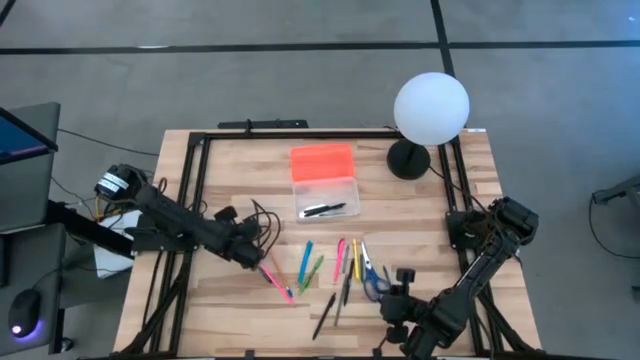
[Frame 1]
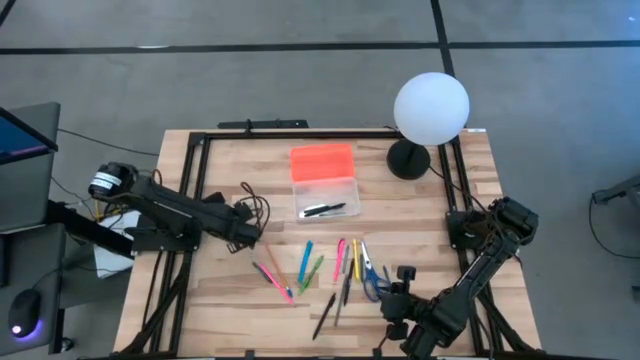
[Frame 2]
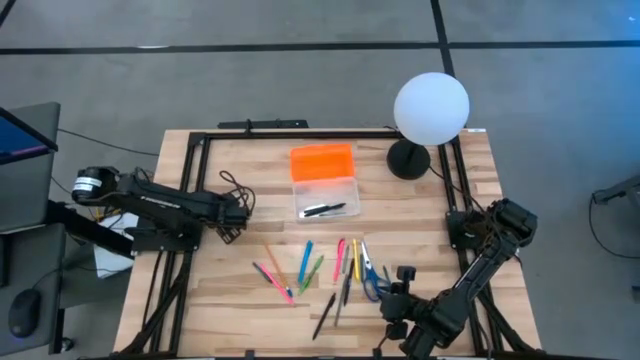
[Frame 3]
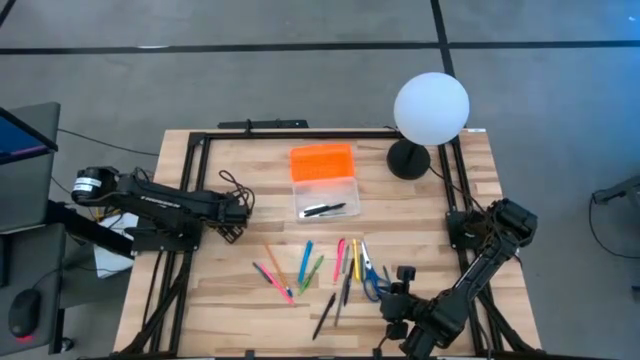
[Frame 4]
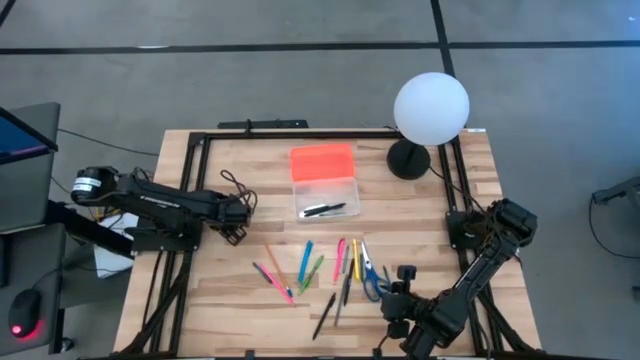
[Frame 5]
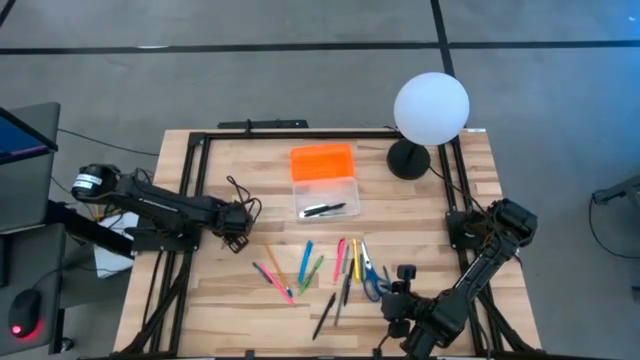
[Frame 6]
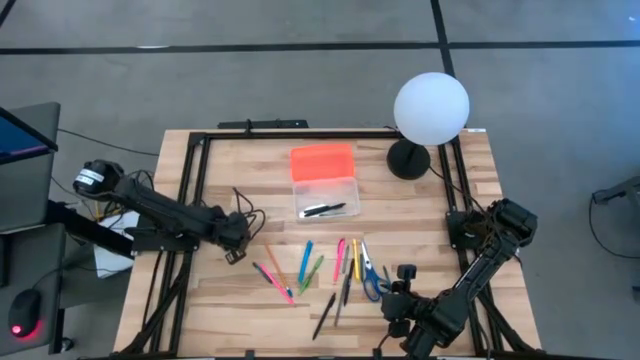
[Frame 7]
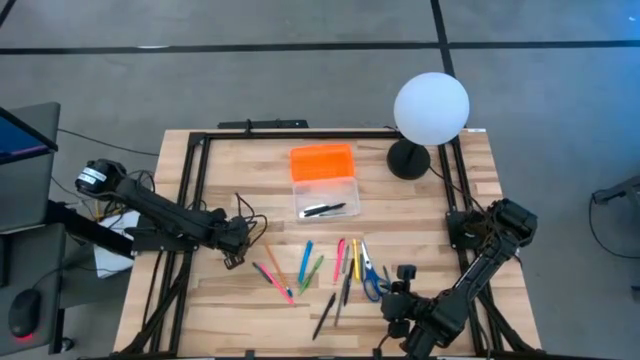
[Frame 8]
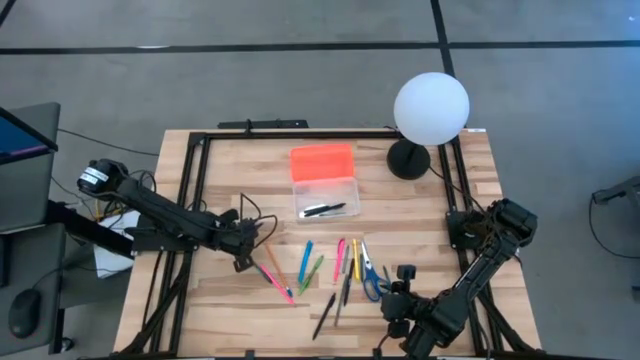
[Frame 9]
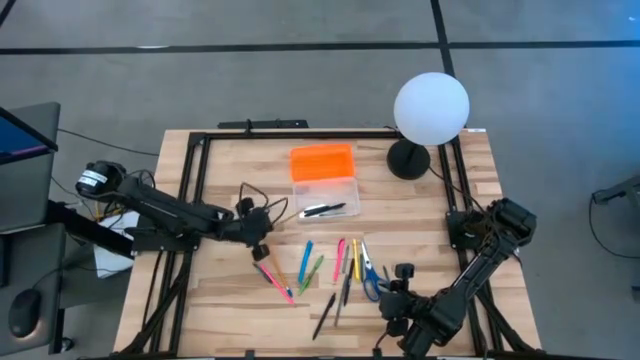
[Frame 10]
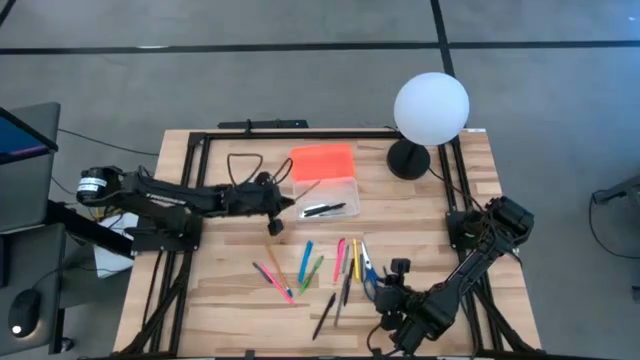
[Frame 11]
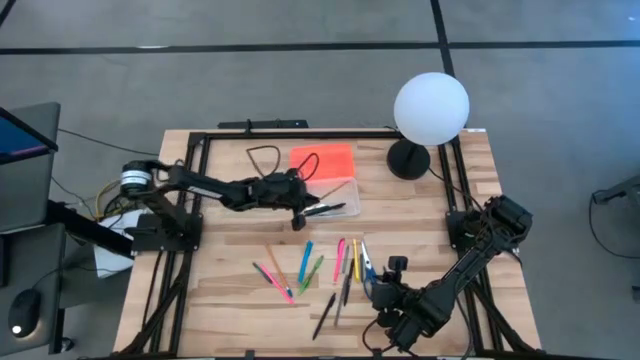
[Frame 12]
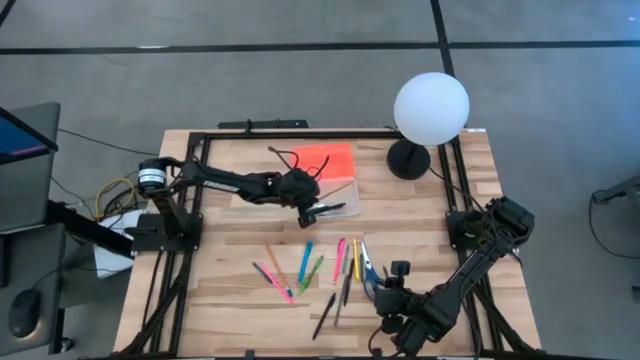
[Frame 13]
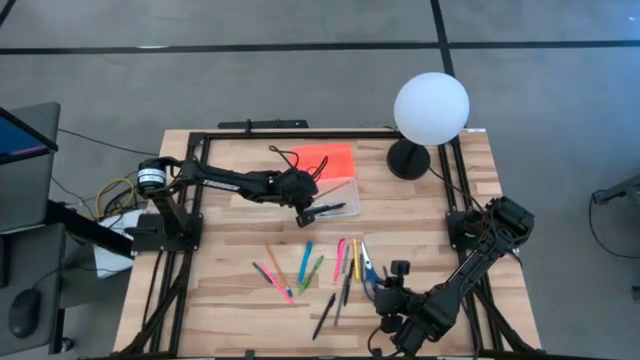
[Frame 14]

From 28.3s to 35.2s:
Task: Pick & place school supplies into a supply box
Put the yellow pencil into the supply box

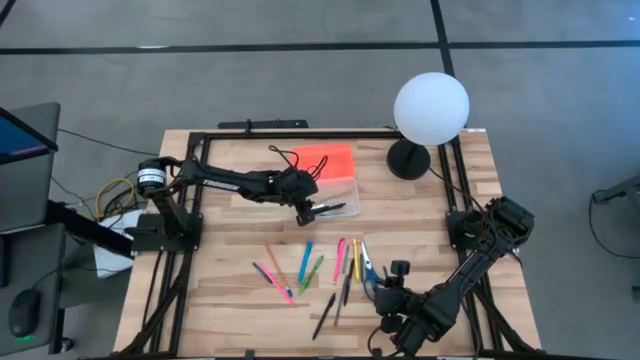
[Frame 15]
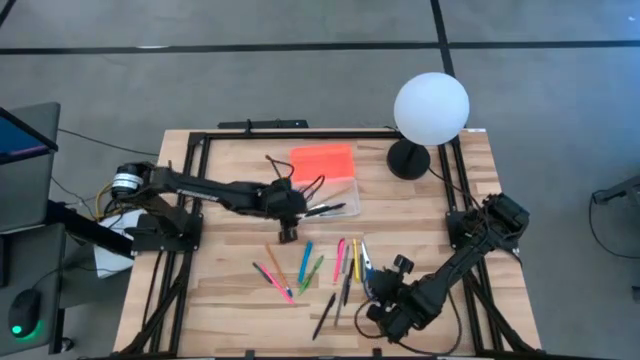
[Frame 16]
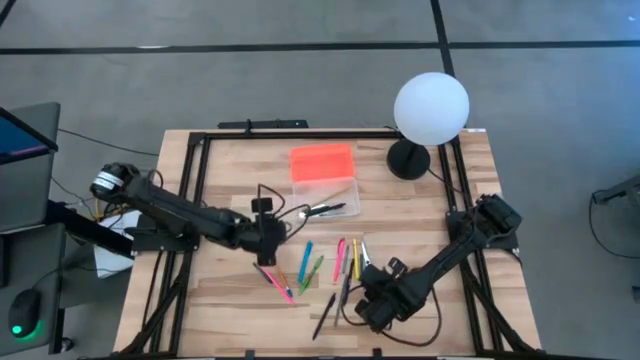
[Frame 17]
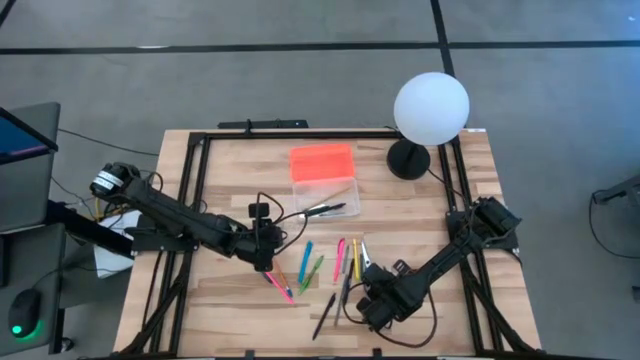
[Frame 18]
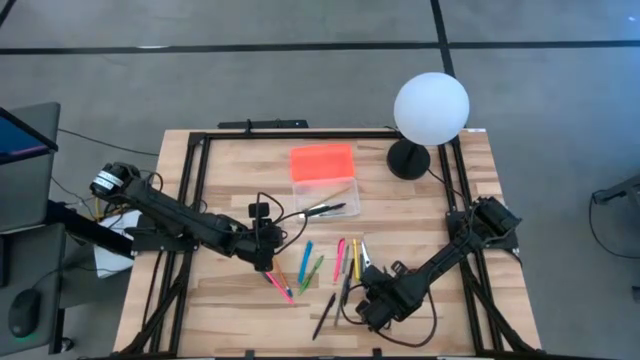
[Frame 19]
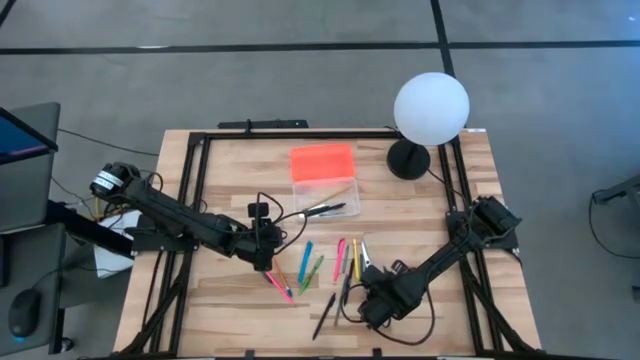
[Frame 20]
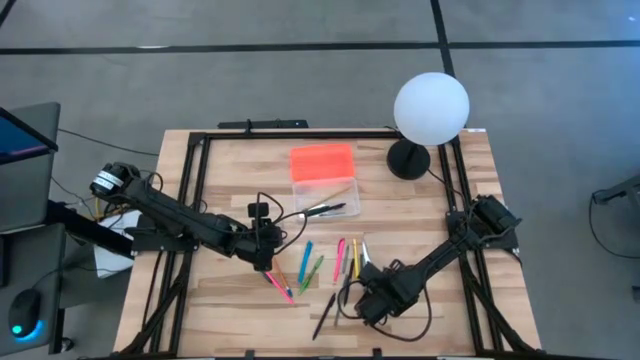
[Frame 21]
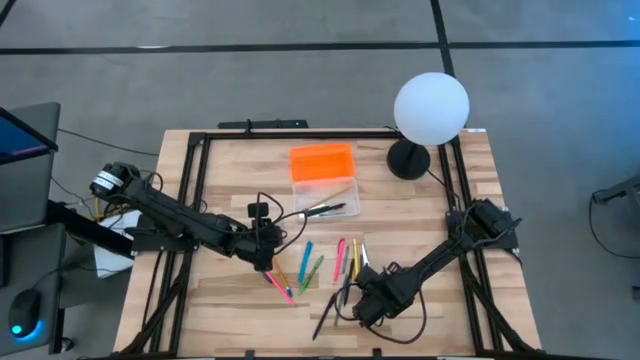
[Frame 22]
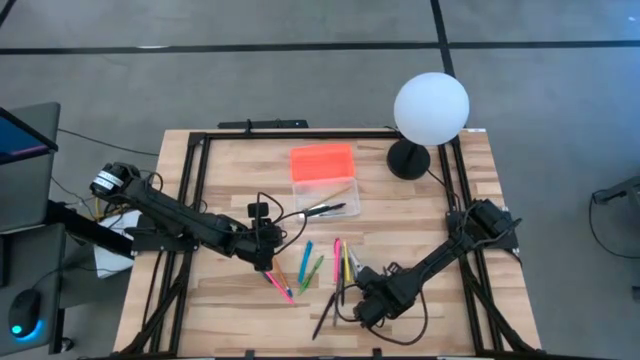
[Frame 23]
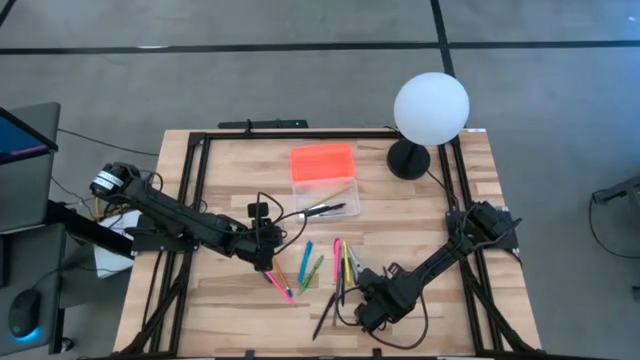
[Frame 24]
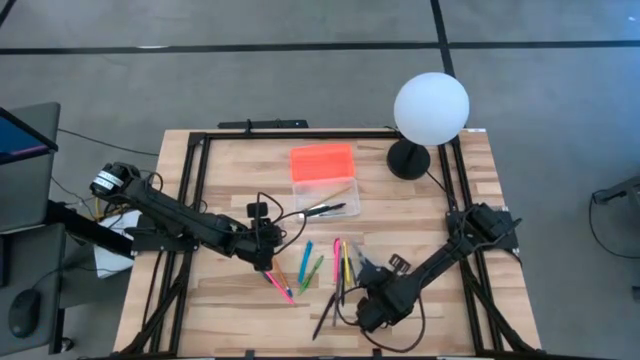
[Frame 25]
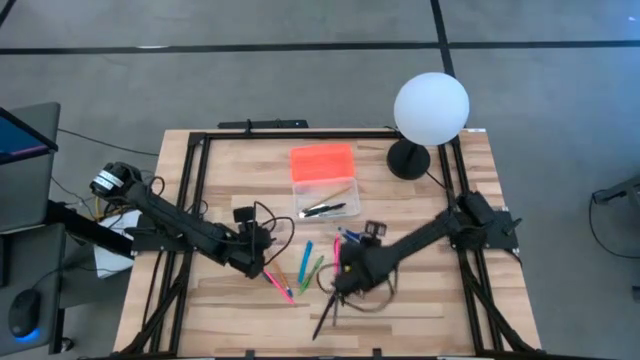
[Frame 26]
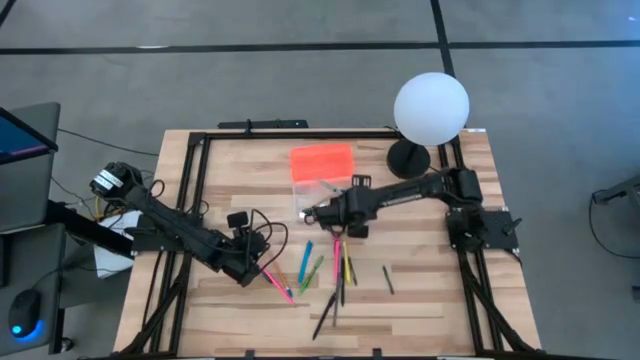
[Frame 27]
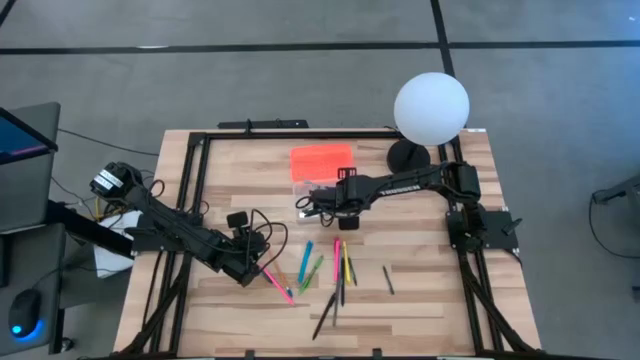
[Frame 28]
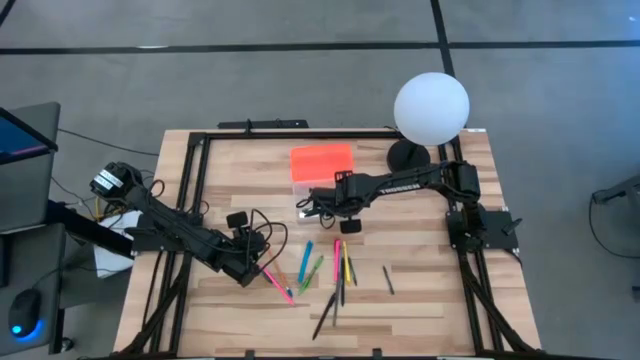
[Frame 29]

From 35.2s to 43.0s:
Put the blue scissors into the supply box

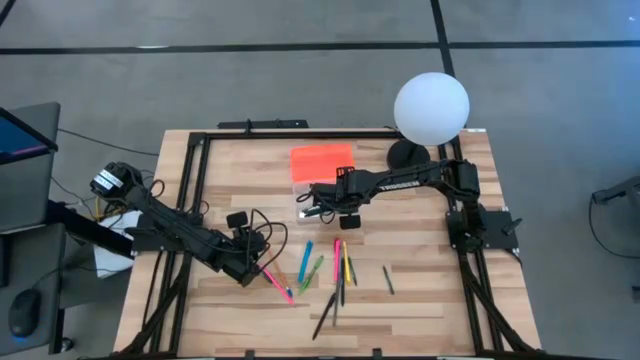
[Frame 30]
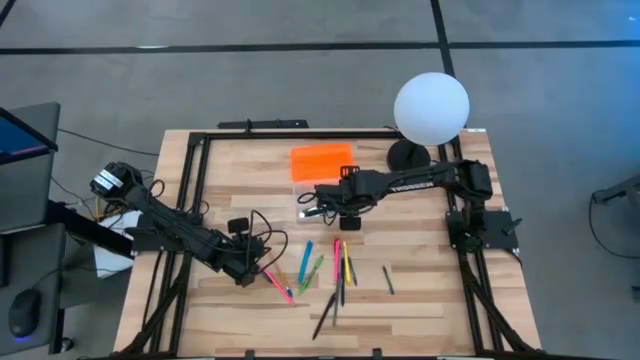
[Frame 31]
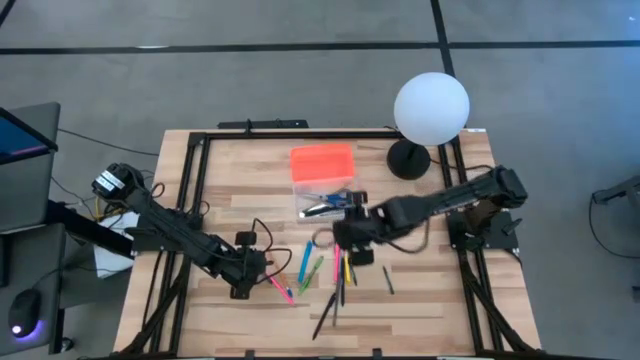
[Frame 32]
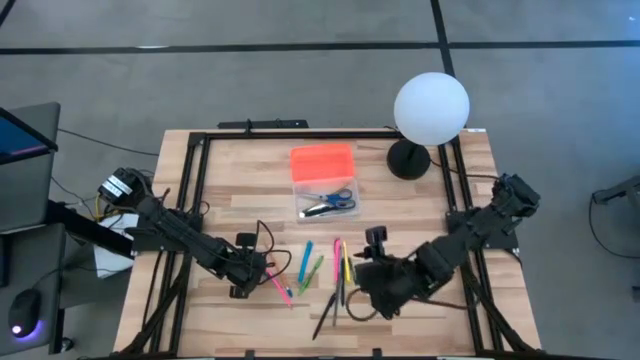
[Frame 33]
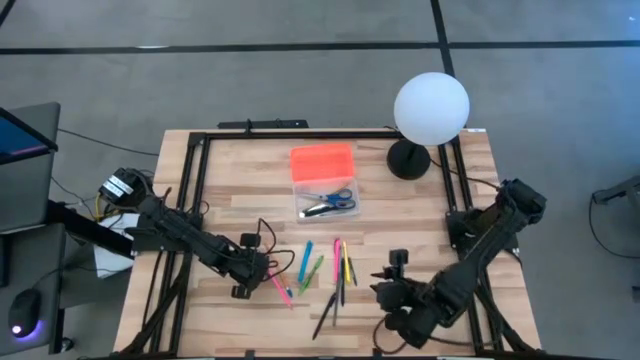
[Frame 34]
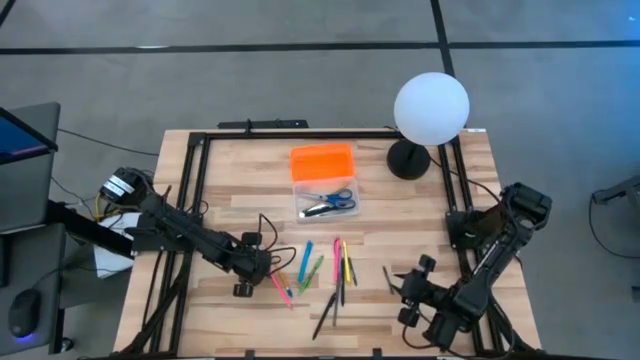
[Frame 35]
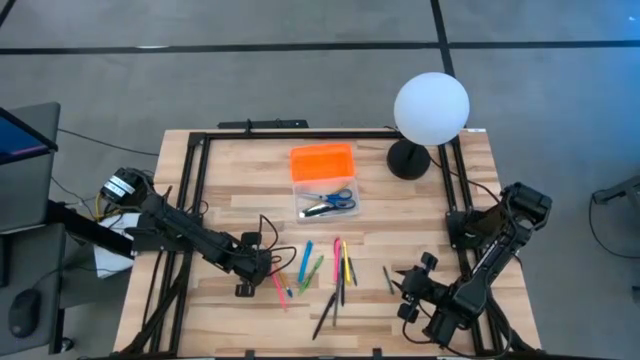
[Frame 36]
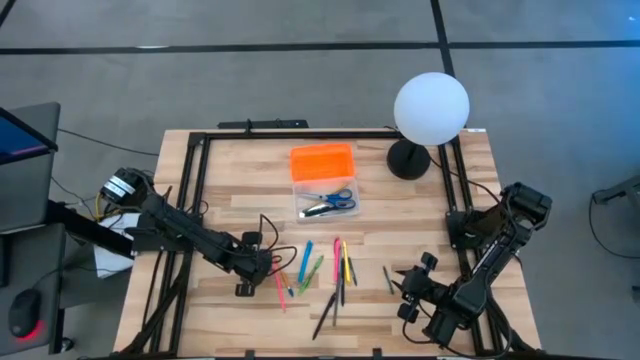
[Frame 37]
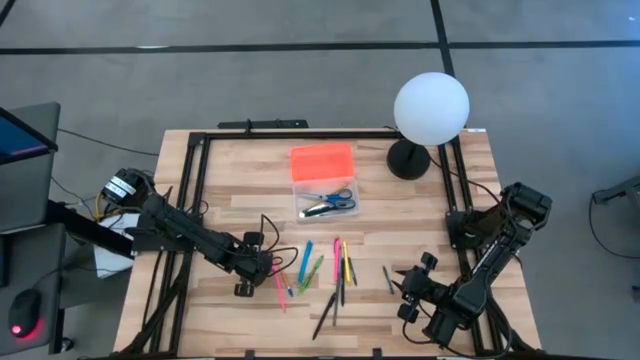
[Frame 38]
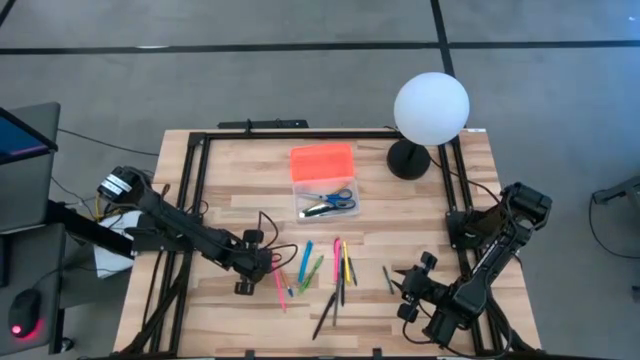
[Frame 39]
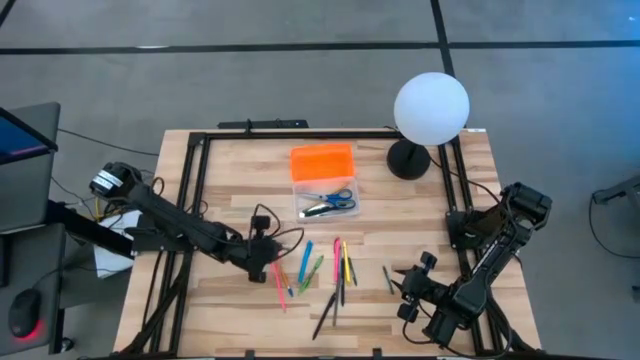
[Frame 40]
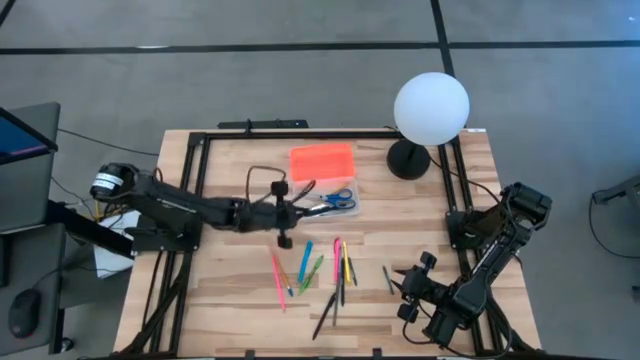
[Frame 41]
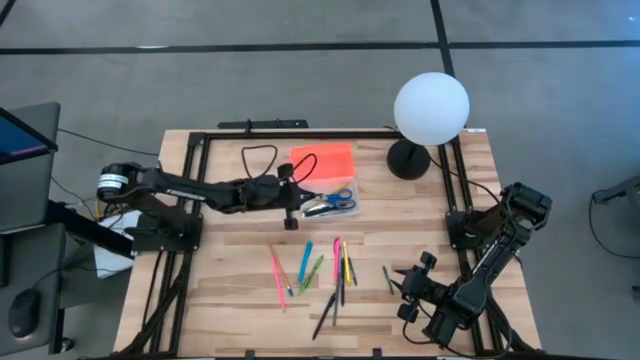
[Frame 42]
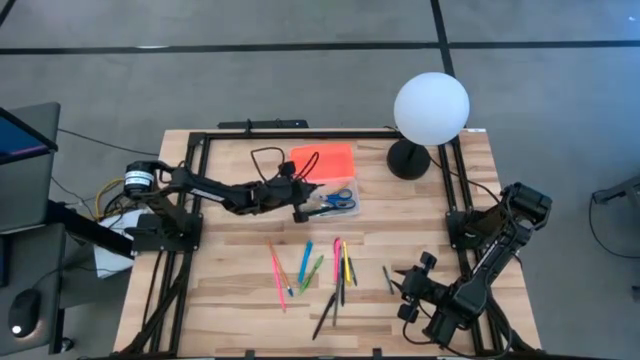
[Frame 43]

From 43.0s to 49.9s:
Put the green crayon into the supply box

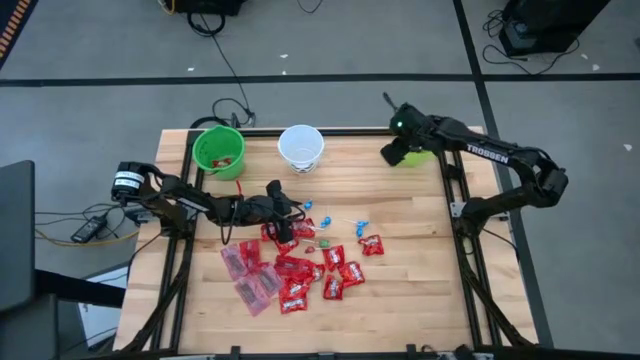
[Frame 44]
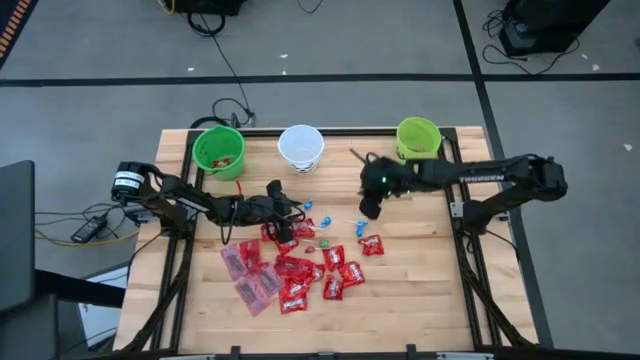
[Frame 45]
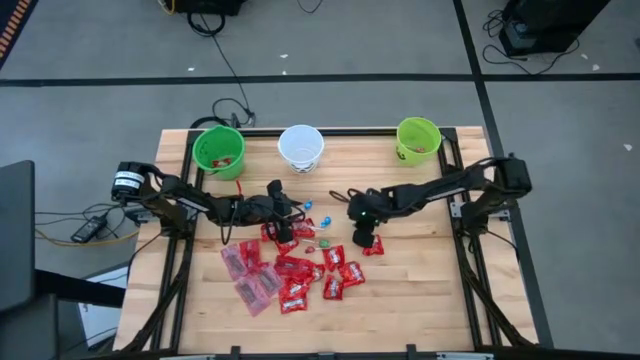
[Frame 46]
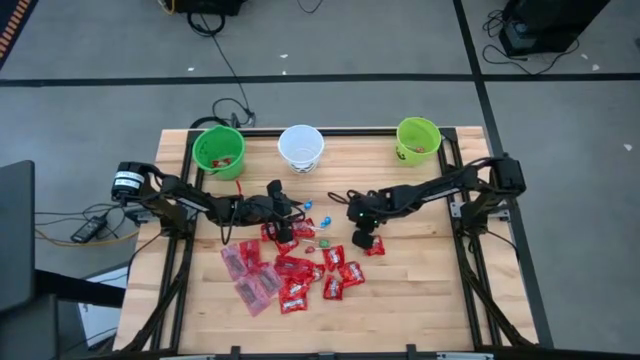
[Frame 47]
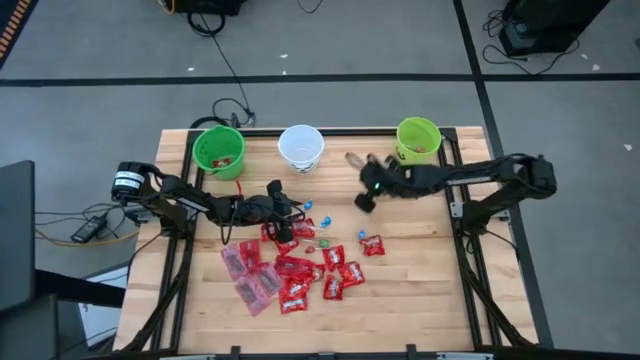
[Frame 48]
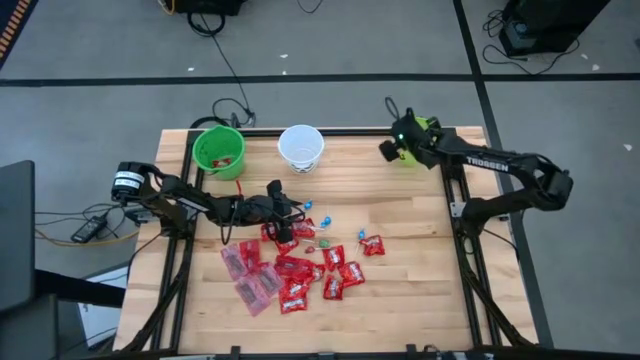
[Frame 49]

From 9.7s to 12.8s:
Task: Sort candy by brand, put in halloween buckets
Put the red lollipop into the light green bucket
